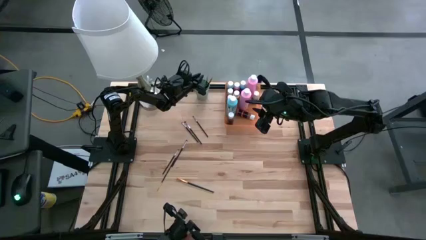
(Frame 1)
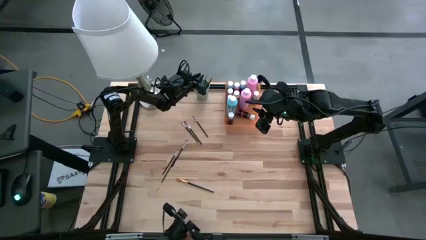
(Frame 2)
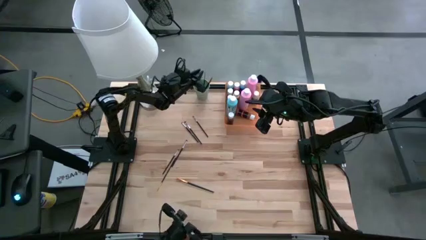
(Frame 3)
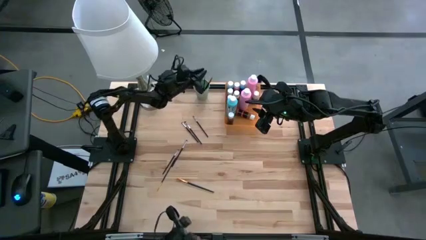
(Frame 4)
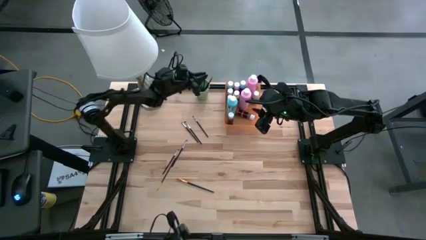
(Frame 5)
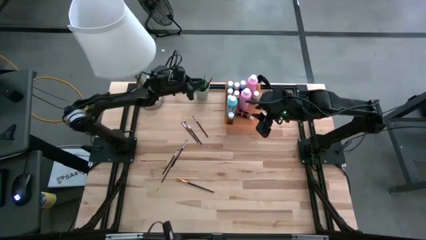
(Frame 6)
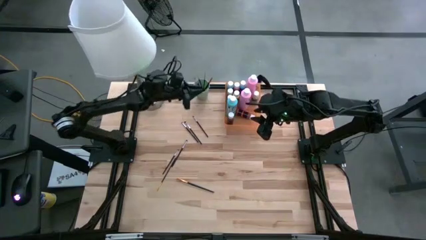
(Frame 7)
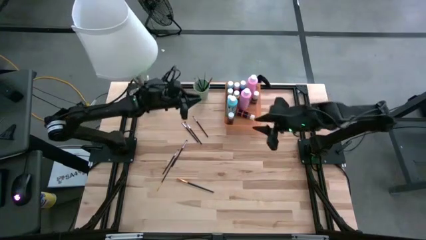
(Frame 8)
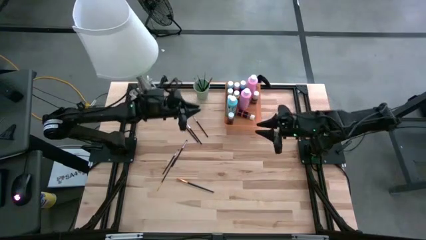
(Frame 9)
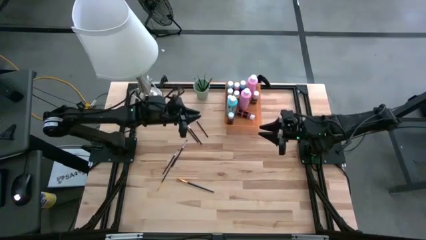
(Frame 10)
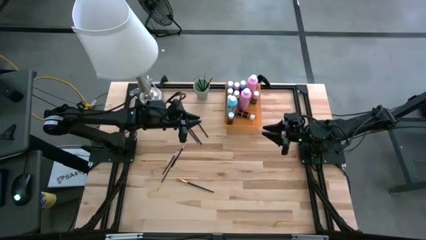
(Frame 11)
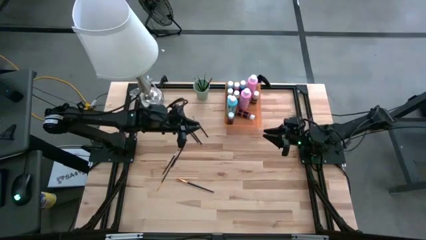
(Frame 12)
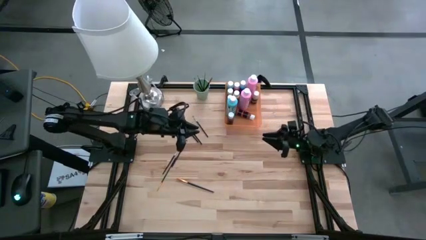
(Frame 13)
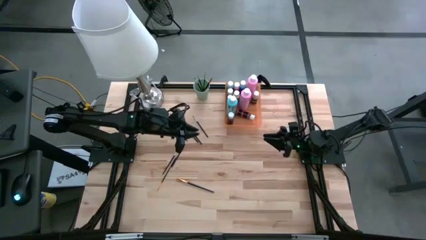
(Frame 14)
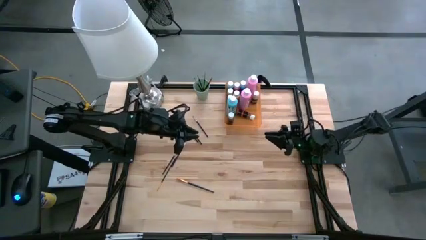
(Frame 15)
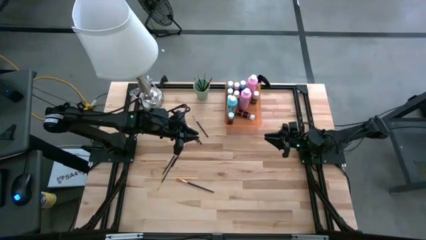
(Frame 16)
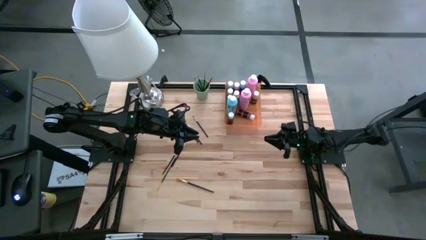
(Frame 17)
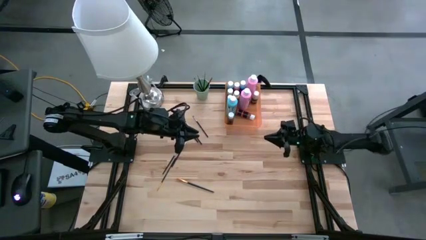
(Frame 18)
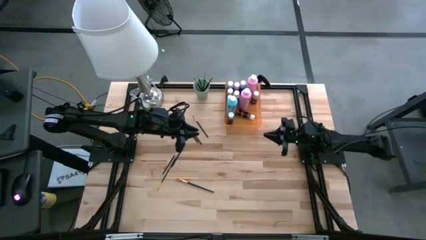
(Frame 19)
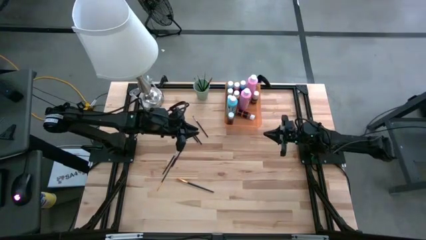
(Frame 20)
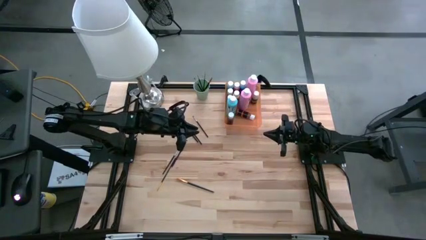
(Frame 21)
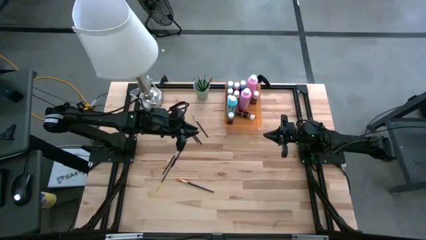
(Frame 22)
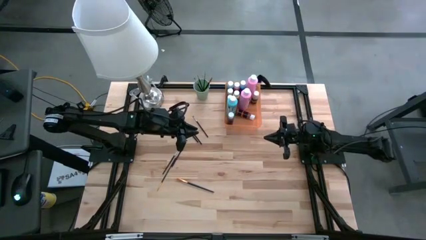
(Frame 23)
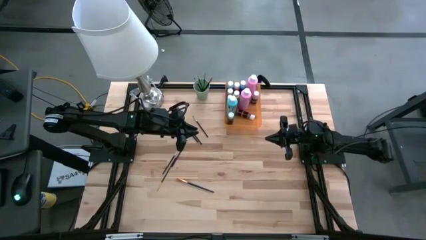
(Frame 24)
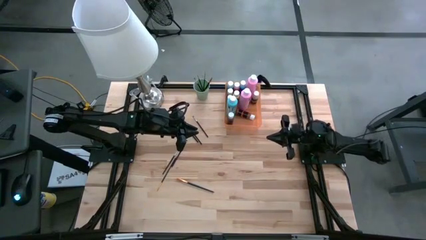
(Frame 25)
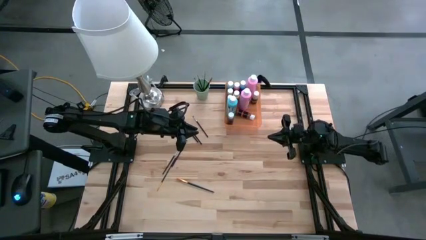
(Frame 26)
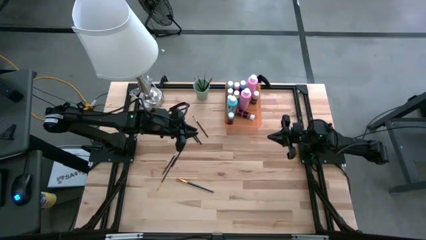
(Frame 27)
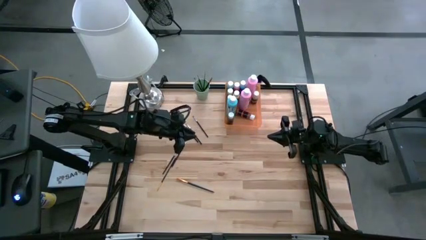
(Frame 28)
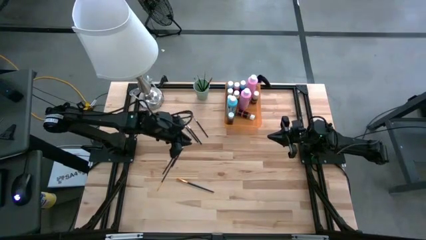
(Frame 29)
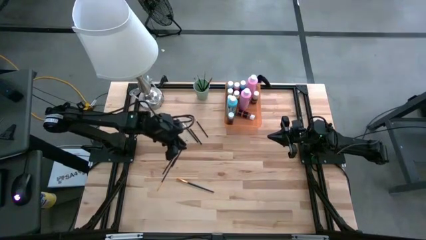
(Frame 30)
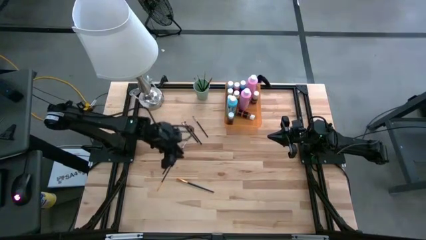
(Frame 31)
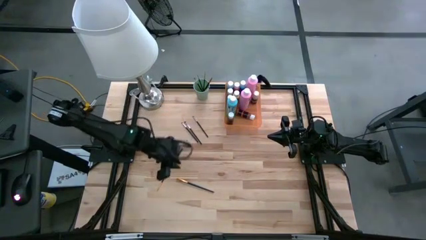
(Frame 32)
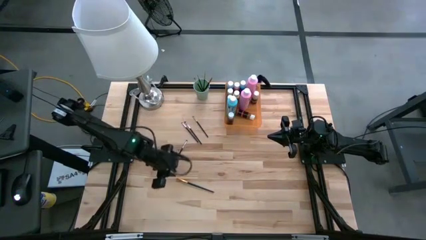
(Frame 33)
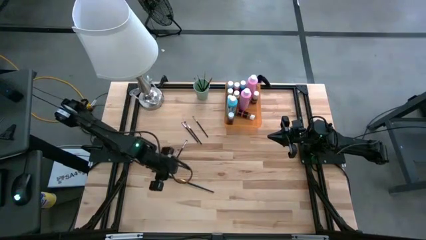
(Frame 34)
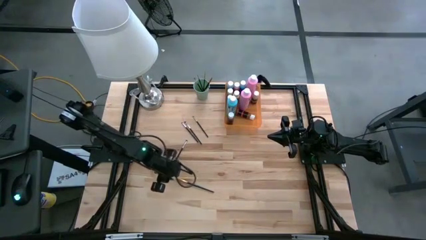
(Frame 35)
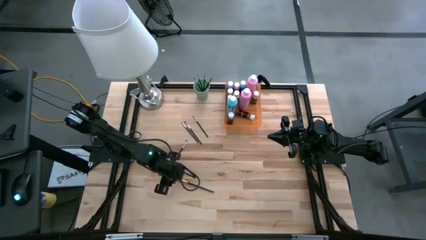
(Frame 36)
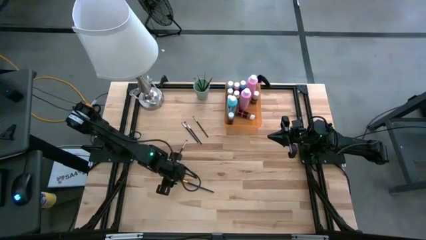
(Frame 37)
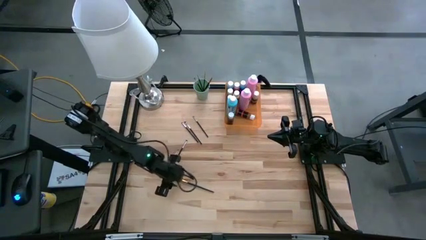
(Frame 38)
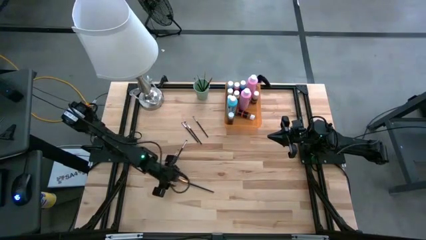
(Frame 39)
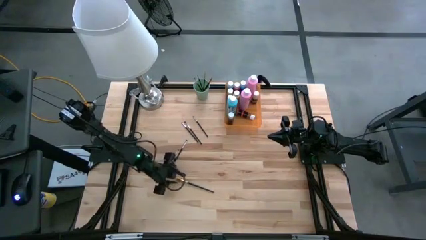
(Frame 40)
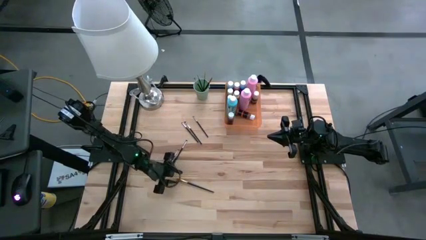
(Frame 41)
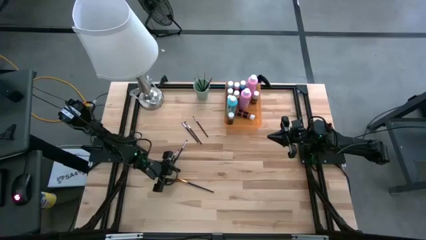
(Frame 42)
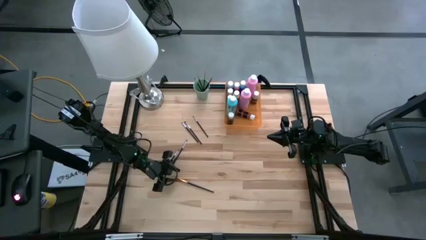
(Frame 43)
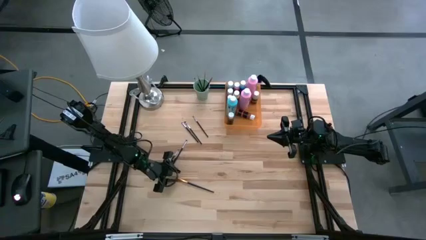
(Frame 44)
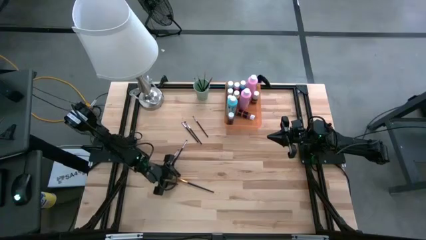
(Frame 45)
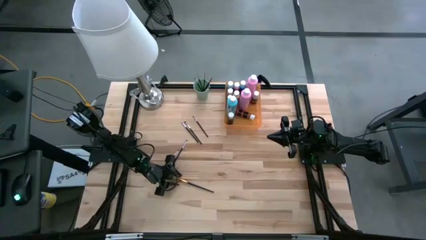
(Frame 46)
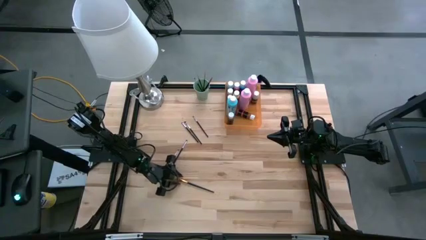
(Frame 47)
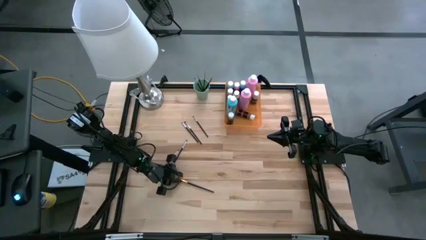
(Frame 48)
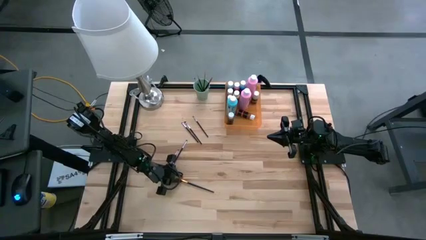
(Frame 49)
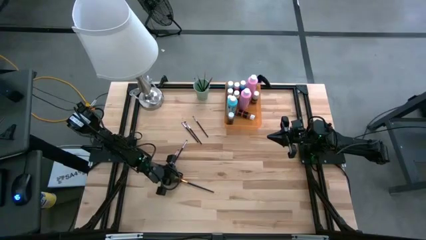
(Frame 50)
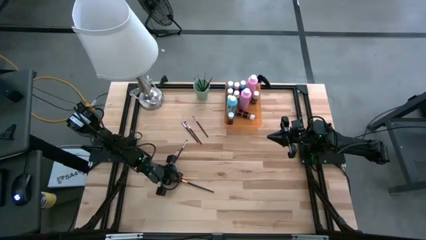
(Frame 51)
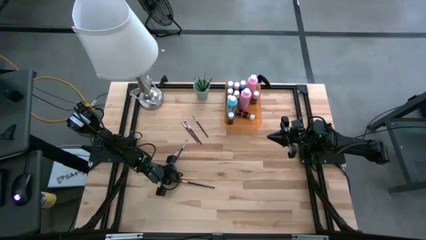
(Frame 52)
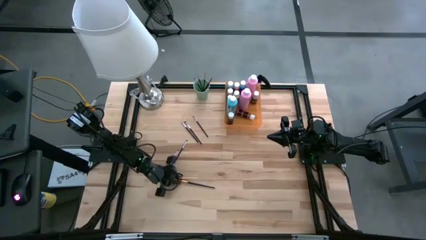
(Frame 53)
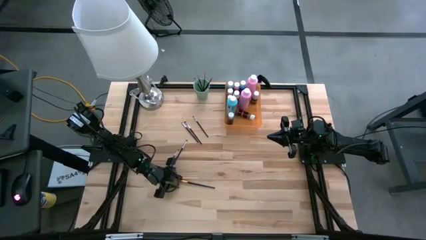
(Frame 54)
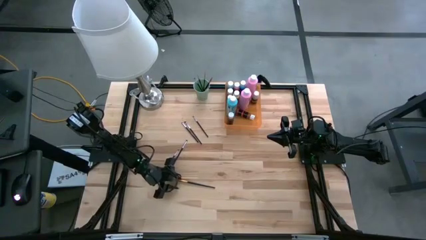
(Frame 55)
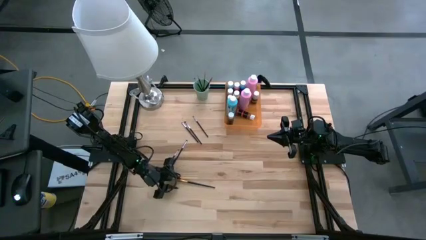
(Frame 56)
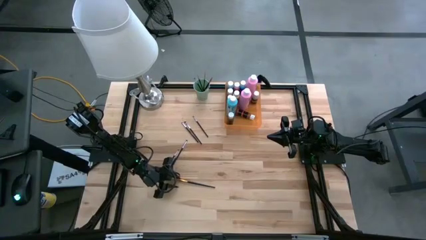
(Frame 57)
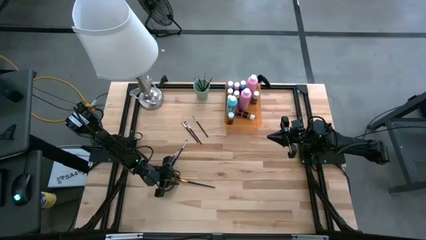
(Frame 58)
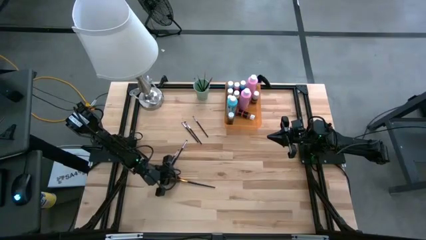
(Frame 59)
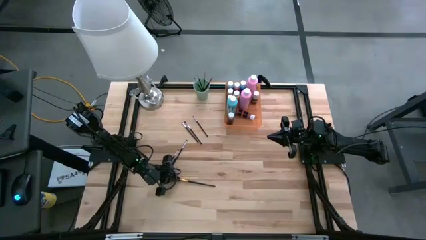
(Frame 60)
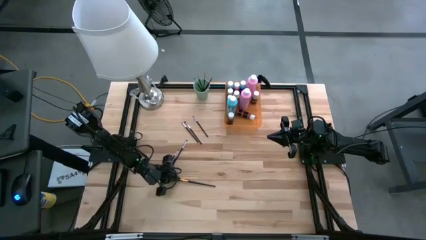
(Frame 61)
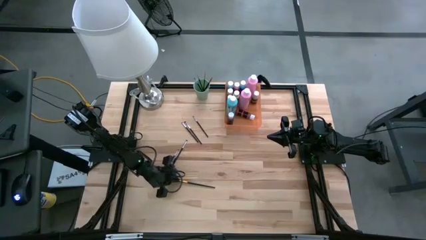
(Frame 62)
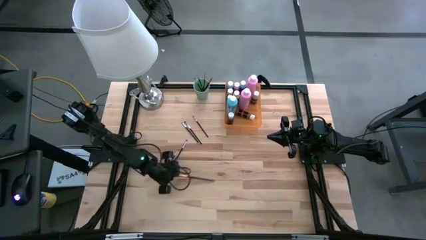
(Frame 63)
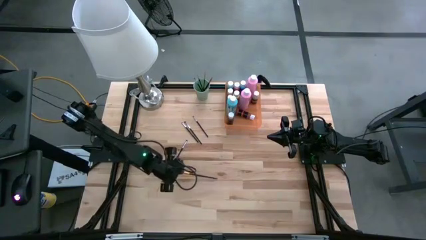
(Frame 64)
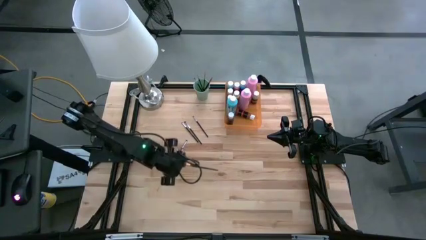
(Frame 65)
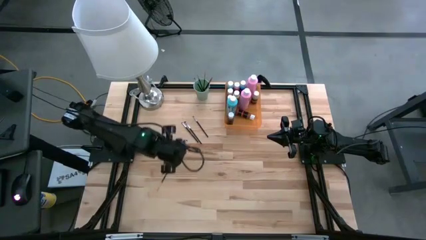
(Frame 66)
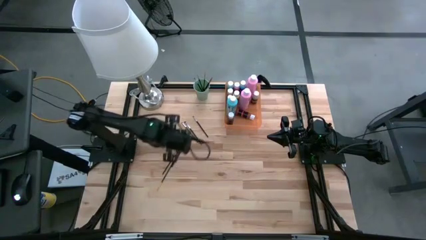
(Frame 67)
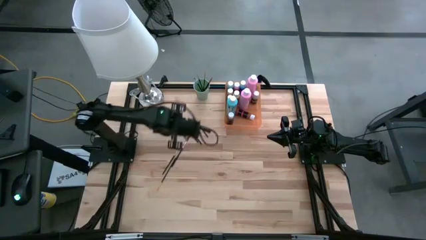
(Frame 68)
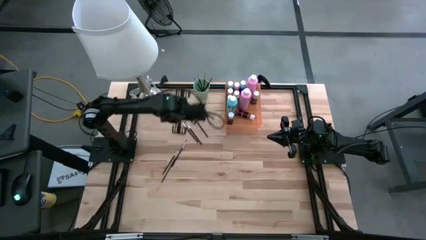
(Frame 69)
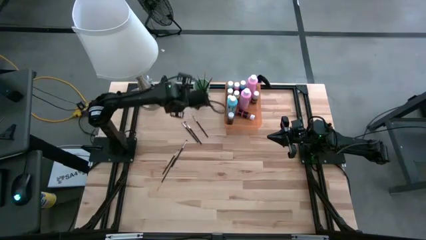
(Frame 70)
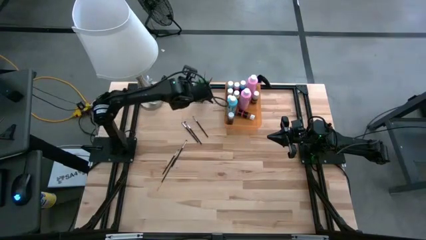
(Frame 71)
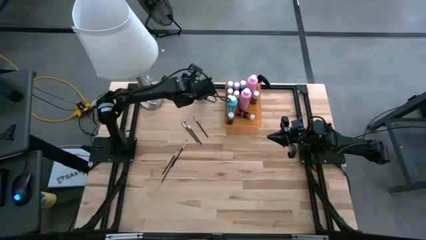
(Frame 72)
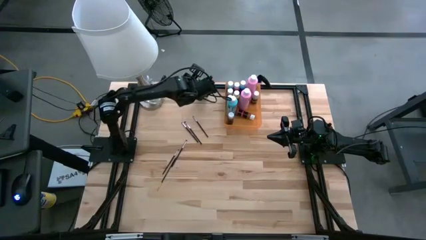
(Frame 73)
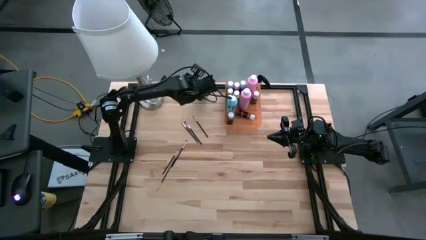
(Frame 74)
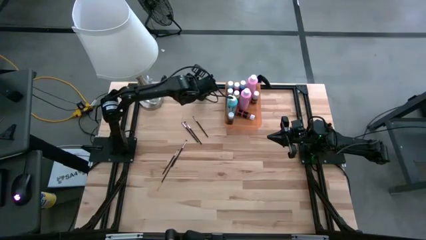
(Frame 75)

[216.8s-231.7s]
Task: Pick & Place Paint Supplies
Put the yellow paint brush into the green cup
